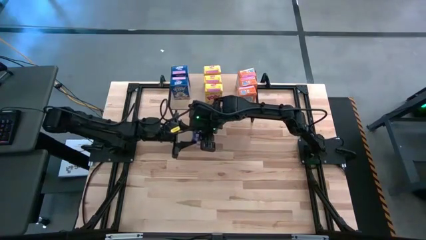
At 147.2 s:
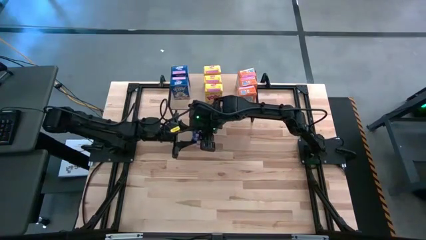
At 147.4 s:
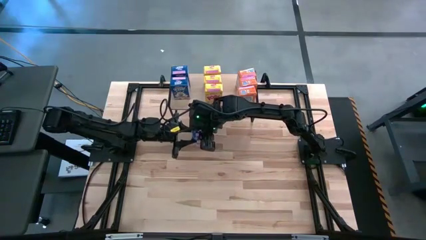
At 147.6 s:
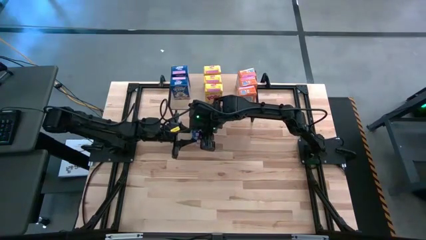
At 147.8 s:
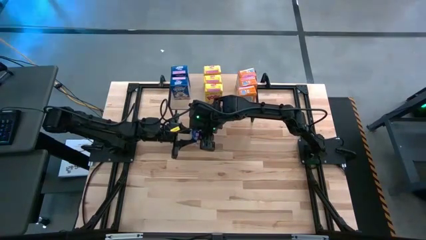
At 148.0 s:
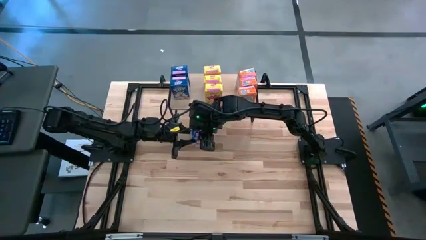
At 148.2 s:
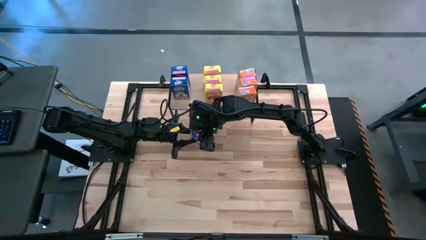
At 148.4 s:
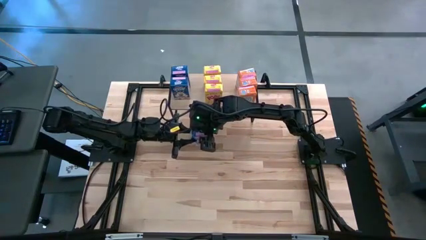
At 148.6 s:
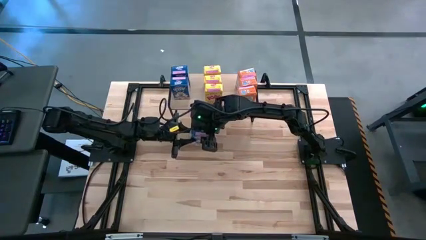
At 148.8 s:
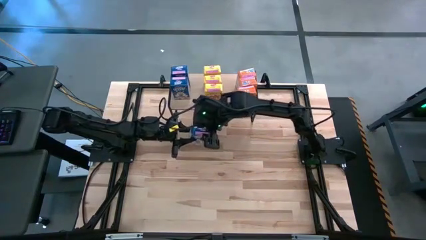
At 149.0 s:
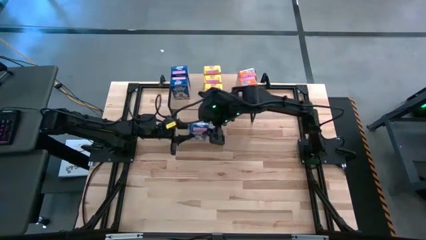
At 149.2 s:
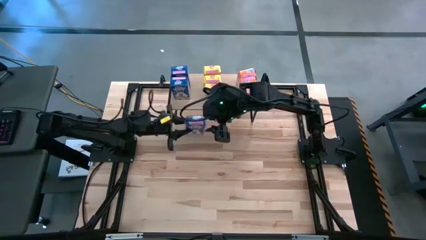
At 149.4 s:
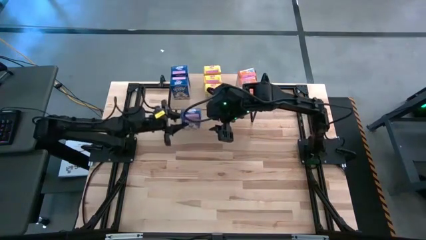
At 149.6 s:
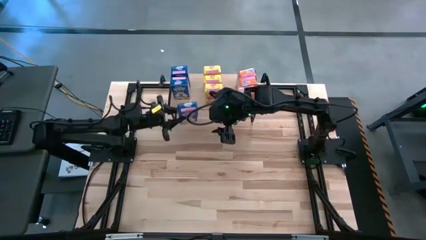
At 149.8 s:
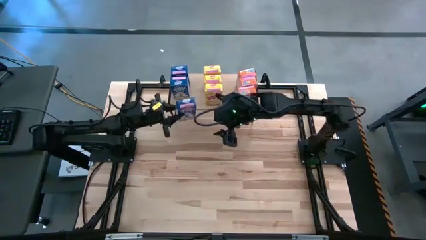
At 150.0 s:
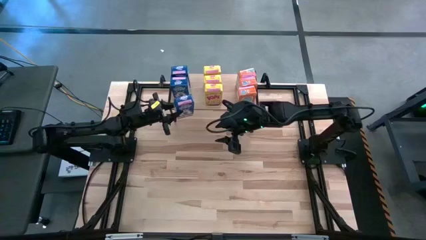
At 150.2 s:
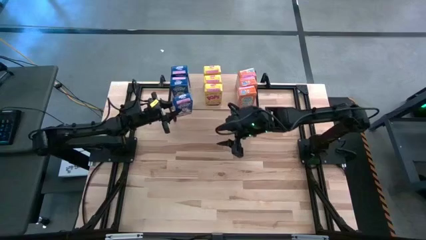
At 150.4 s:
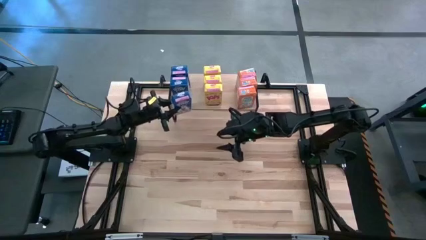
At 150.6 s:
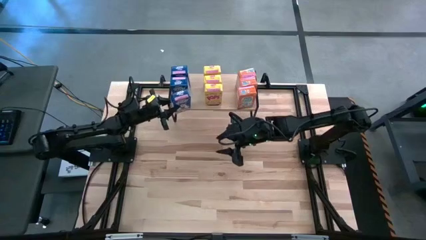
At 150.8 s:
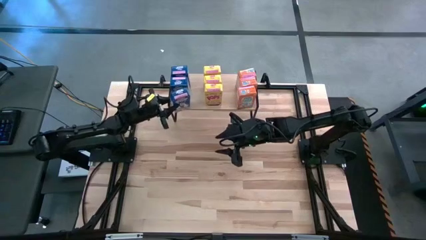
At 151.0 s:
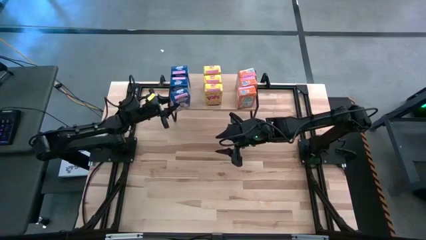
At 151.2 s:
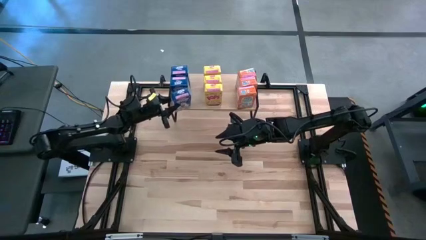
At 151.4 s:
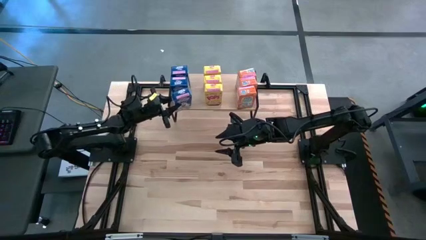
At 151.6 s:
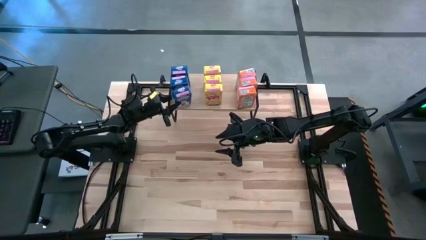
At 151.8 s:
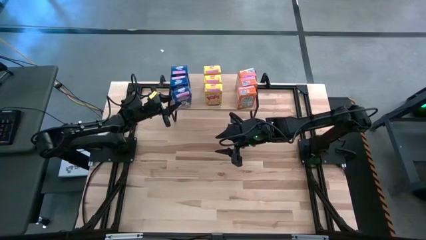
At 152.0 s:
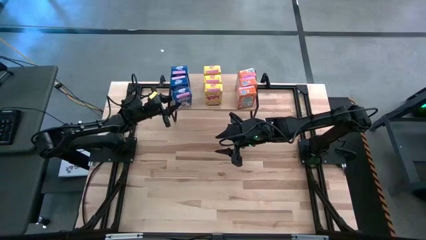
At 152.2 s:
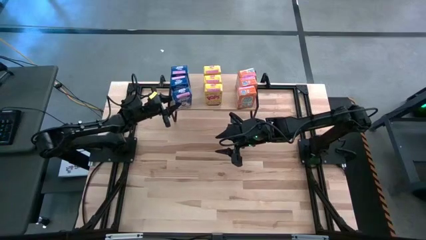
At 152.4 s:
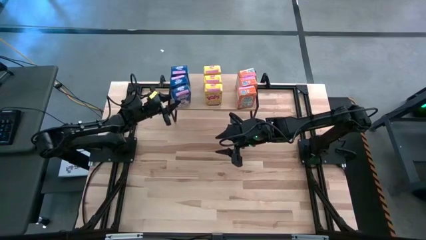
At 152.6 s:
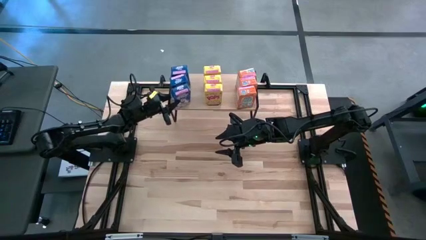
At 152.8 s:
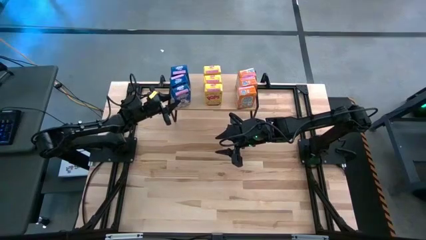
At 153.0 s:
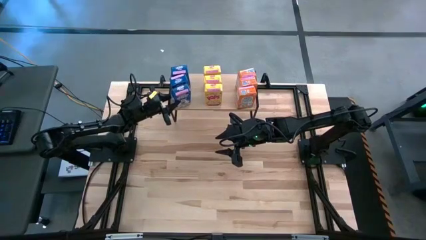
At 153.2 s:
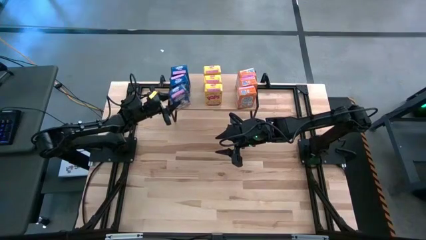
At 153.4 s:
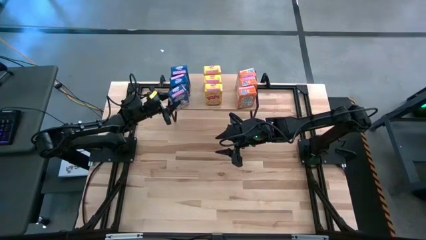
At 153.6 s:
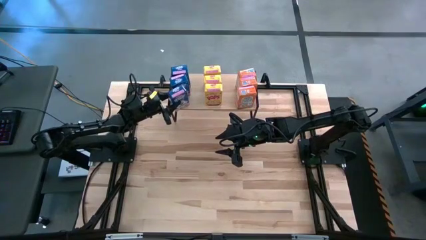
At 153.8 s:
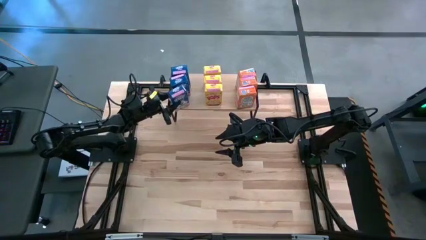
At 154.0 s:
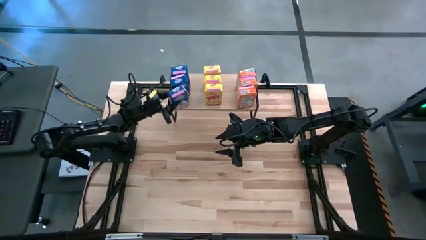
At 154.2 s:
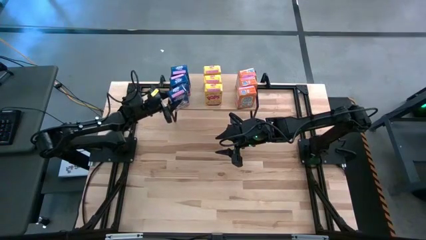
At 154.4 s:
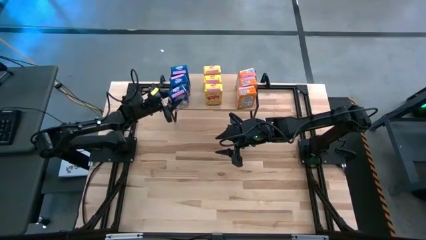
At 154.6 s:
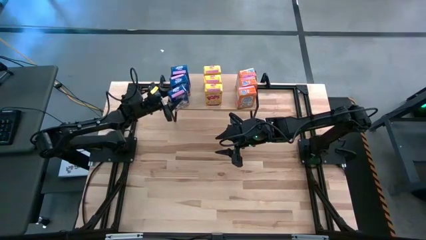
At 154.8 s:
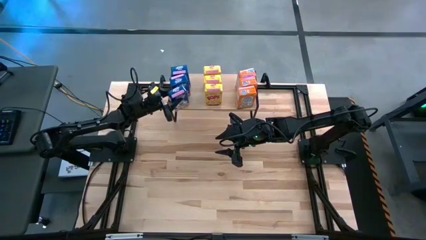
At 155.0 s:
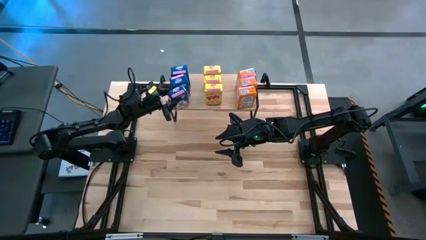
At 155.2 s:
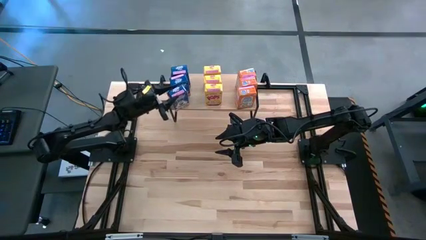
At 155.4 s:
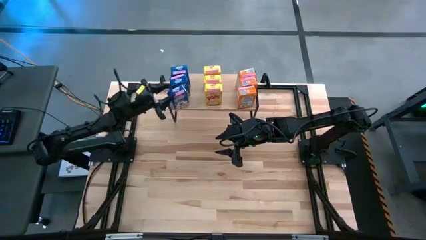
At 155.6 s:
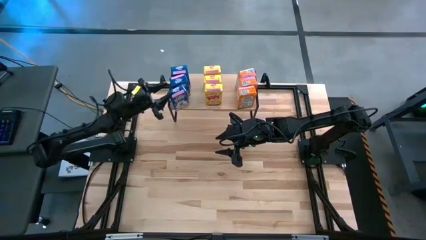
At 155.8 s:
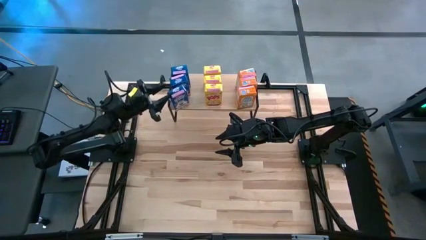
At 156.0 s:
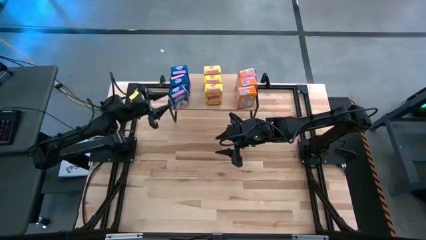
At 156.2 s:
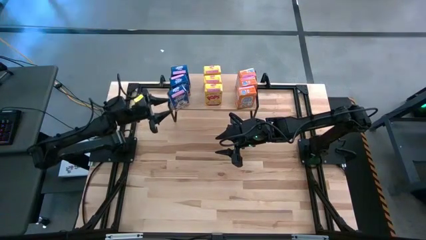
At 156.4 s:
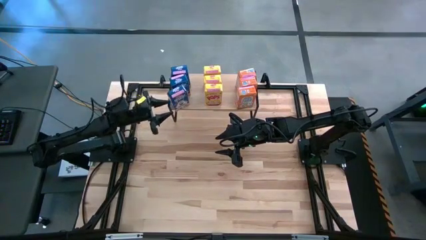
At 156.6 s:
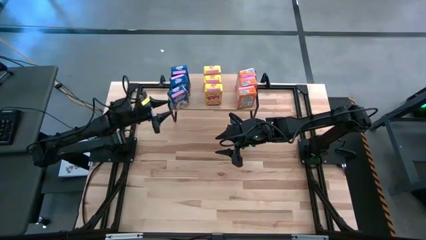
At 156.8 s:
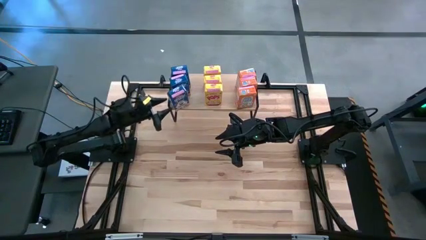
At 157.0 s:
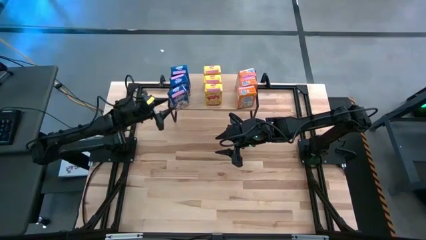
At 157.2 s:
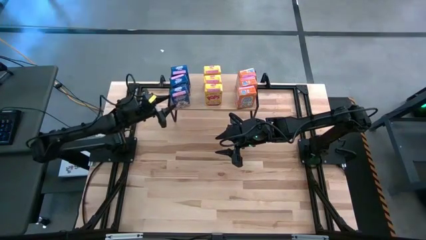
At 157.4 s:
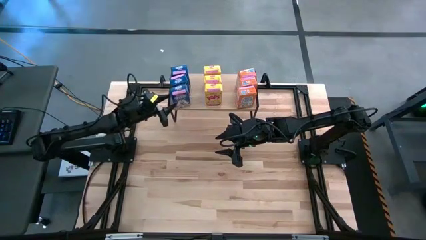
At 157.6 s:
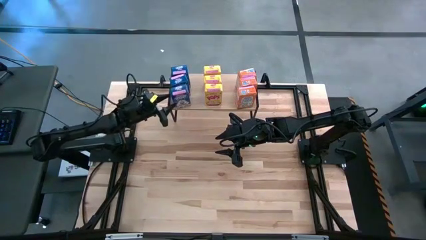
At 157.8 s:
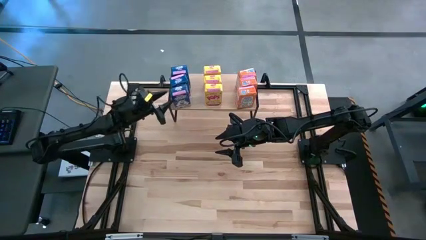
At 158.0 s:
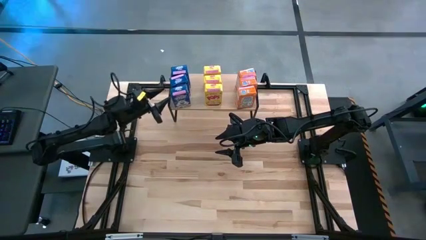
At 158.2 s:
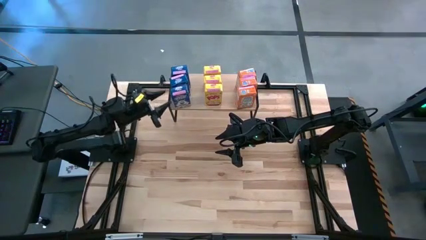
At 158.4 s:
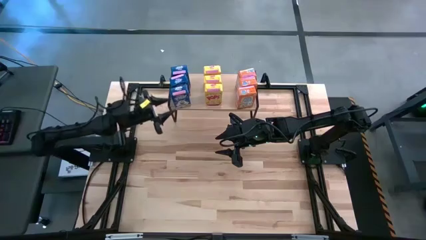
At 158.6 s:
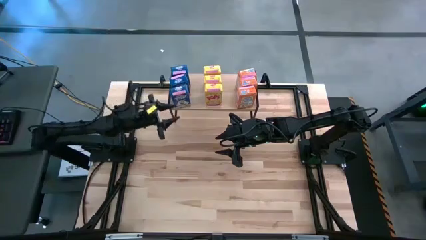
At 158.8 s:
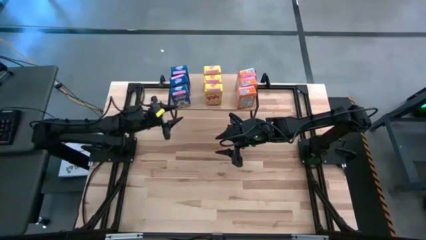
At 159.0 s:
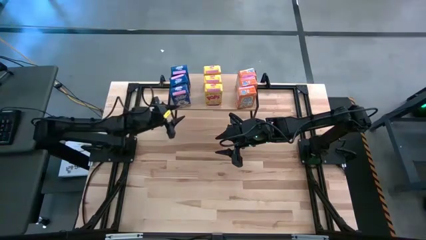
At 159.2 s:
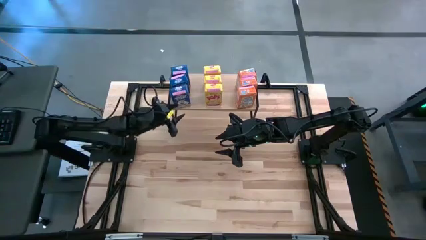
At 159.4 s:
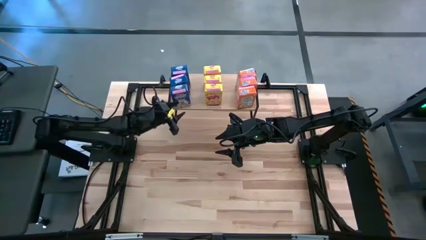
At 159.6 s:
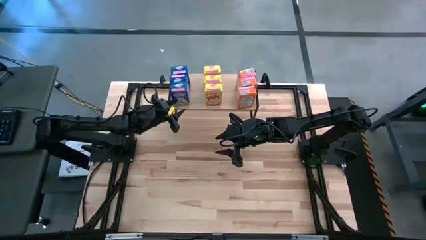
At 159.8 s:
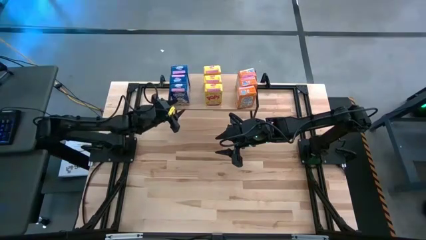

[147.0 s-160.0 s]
Task: Stack cereal on shelf
Put the blue cereal box on the shelf

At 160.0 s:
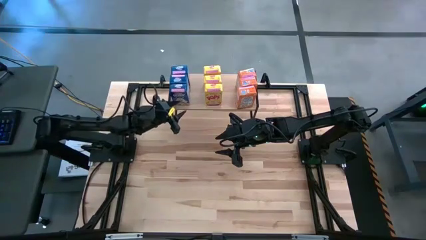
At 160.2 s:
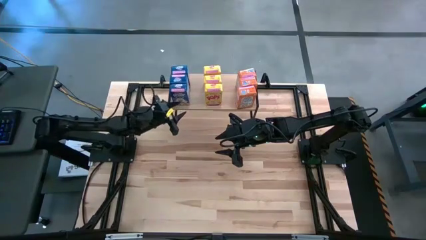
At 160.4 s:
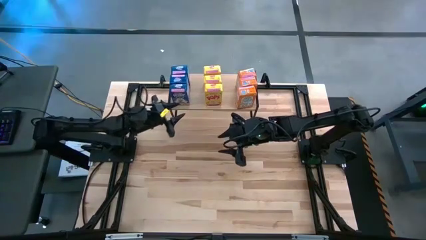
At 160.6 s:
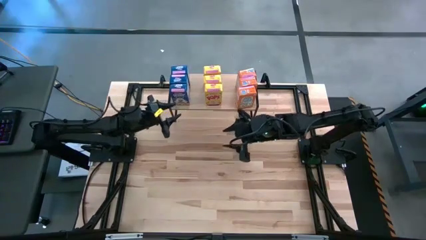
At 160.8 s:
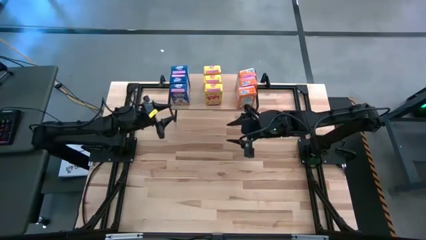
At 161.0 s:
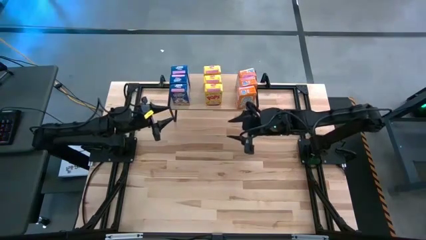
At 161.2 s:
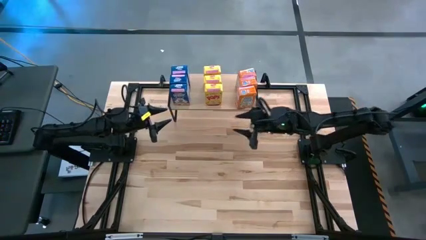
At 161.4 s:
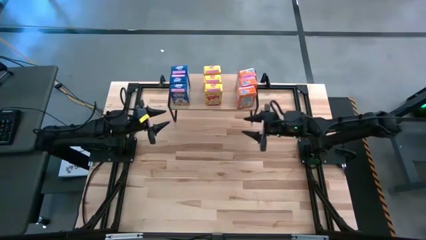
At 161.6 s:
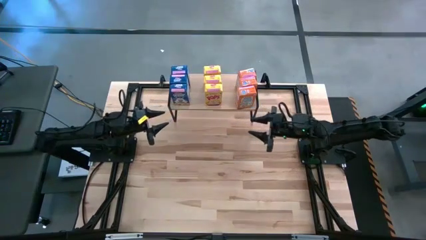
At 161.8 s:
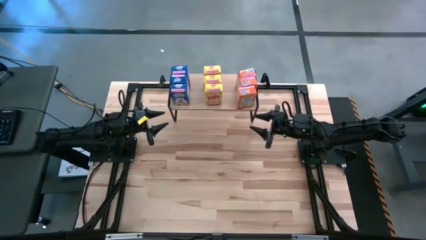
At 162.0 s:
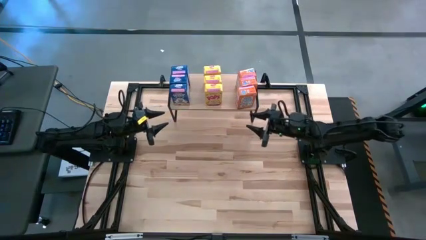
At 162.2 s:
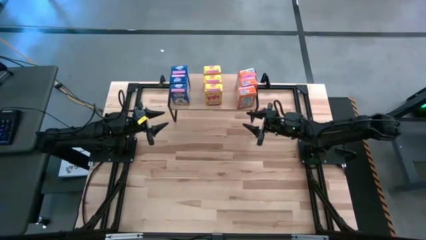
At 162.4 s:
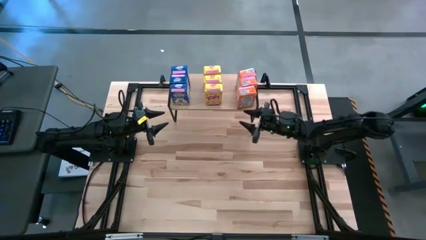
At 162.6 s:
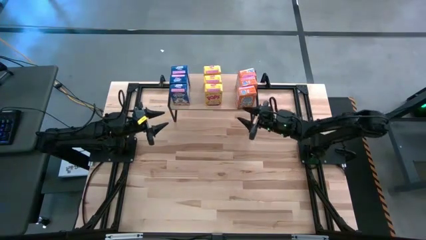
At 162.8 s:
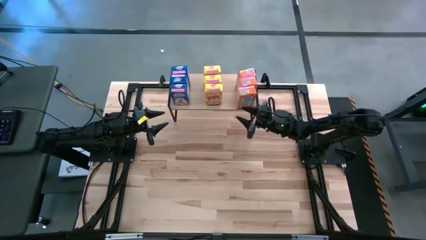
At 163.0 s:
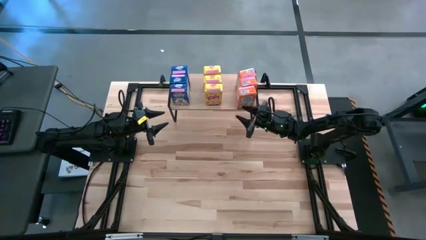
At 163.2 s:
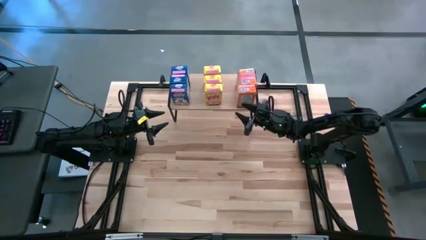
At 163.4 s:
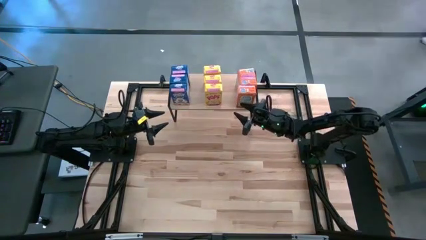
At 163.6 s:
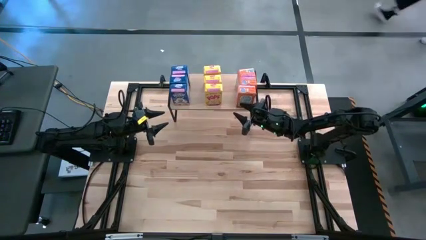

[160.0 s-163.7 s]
Adjust the orange cereal box
